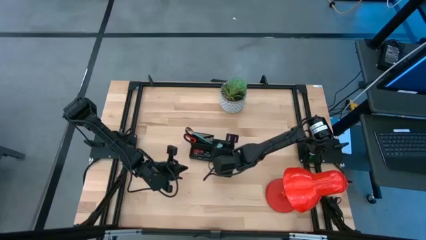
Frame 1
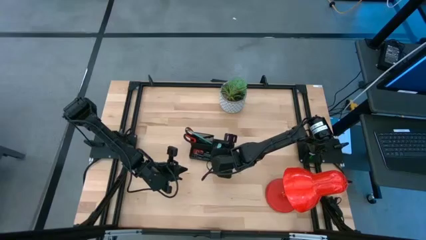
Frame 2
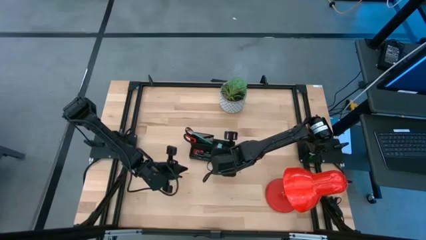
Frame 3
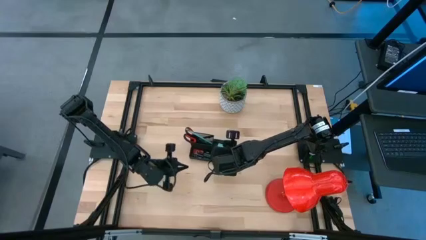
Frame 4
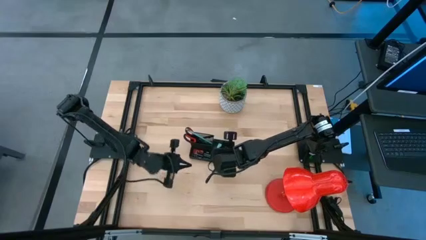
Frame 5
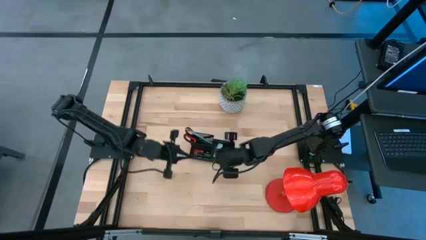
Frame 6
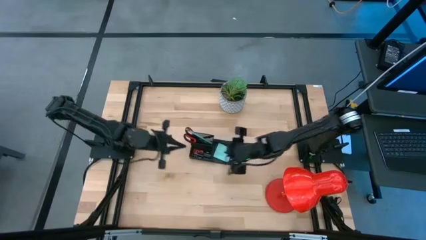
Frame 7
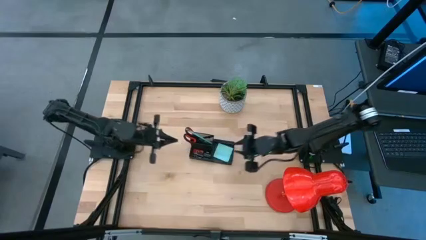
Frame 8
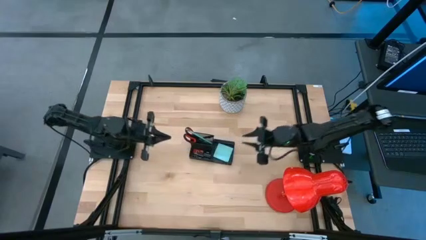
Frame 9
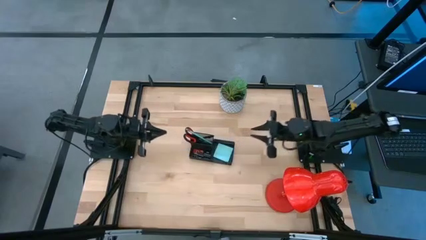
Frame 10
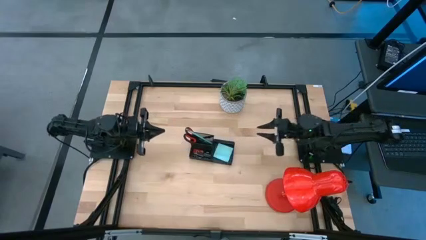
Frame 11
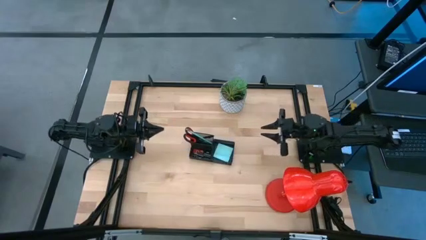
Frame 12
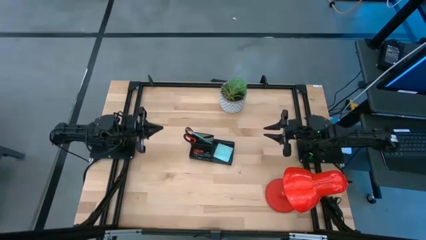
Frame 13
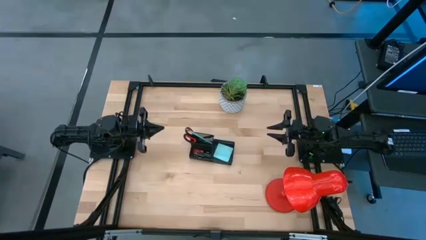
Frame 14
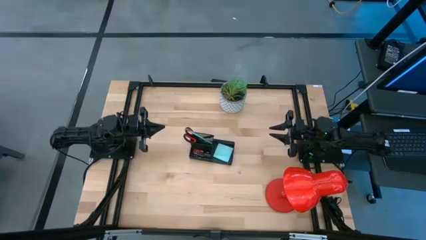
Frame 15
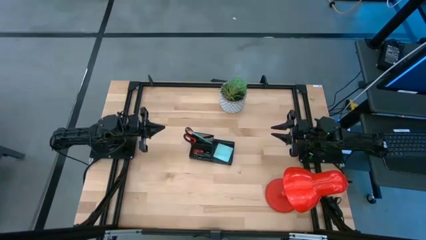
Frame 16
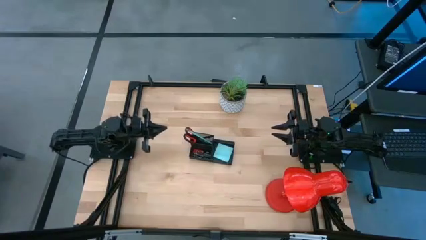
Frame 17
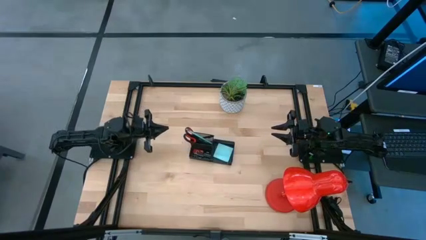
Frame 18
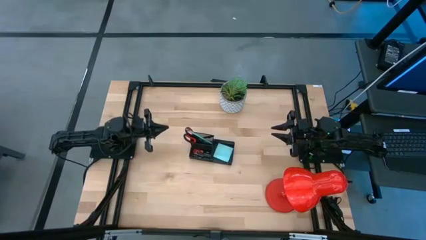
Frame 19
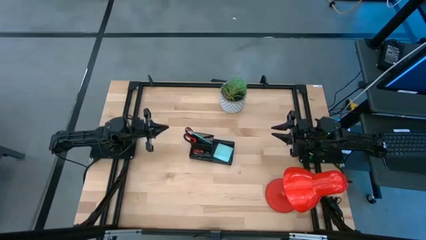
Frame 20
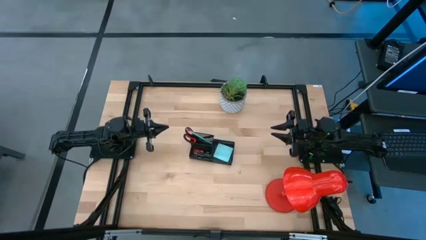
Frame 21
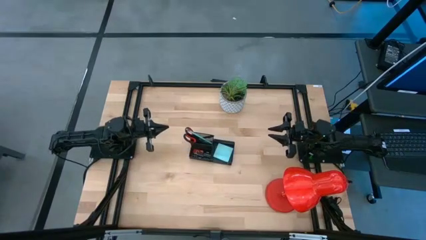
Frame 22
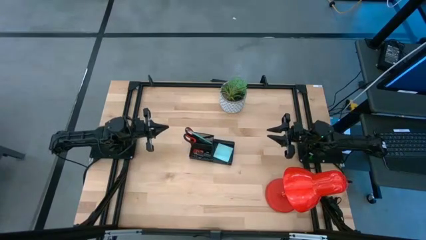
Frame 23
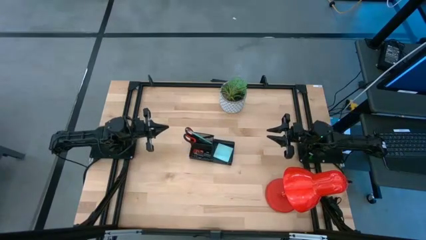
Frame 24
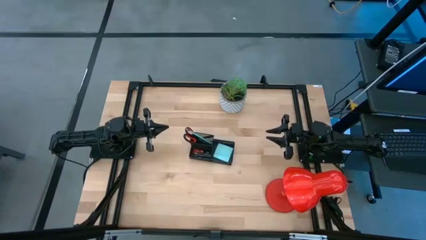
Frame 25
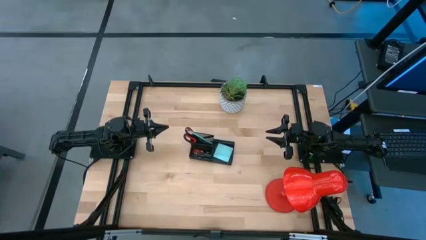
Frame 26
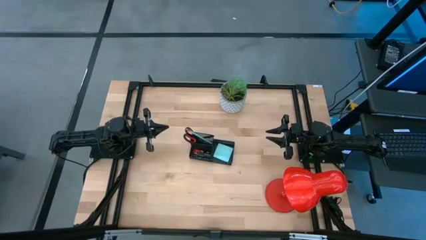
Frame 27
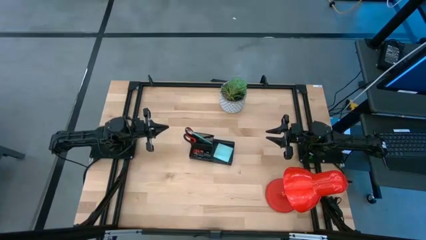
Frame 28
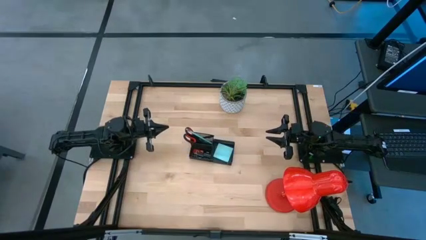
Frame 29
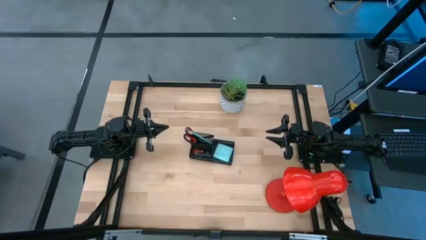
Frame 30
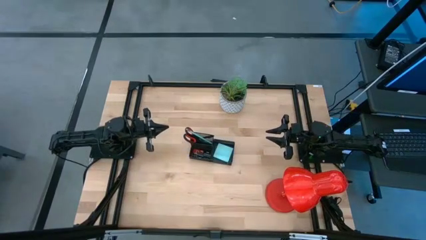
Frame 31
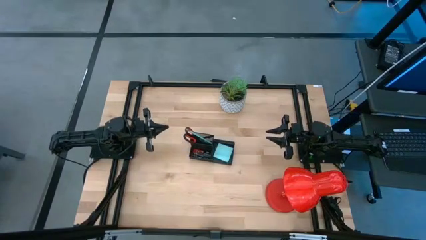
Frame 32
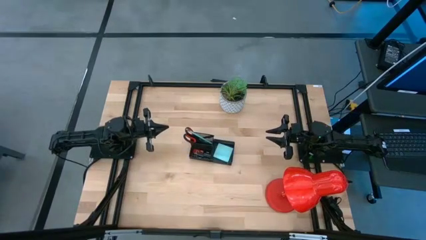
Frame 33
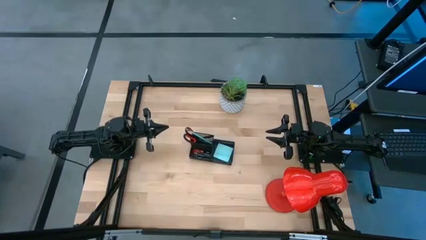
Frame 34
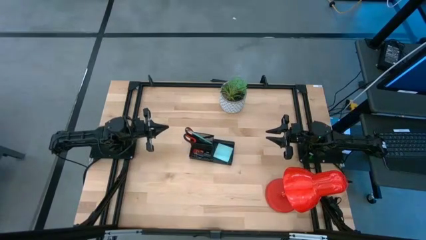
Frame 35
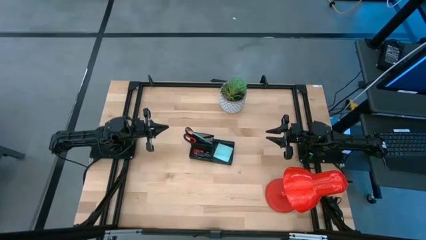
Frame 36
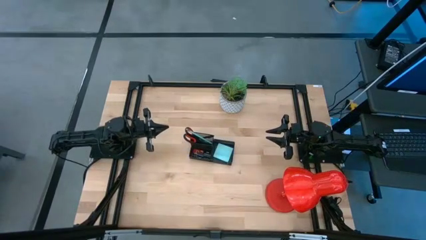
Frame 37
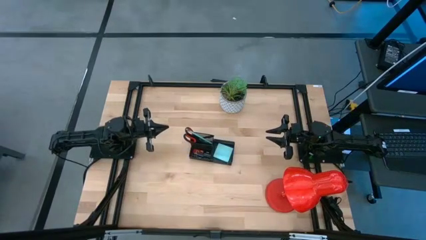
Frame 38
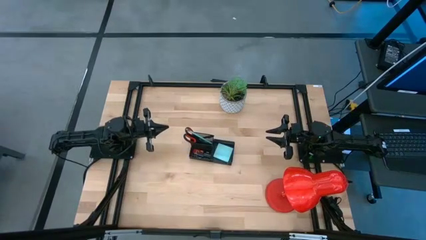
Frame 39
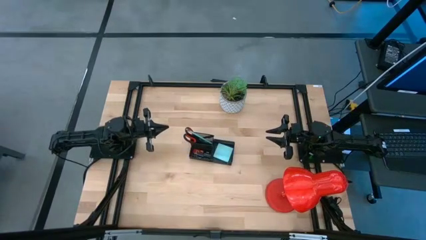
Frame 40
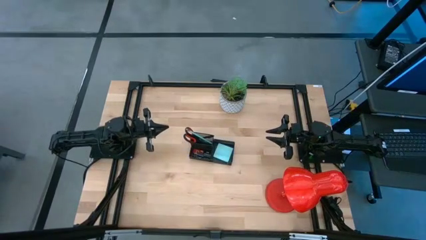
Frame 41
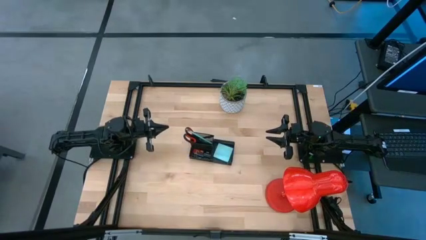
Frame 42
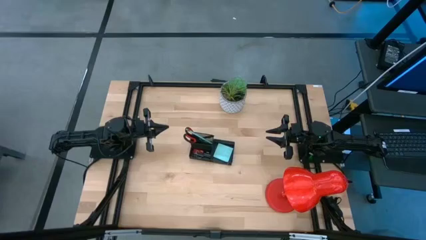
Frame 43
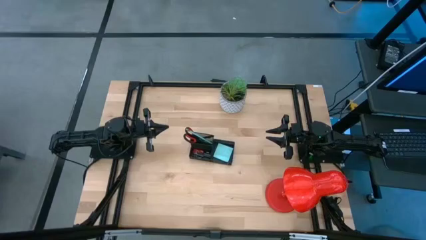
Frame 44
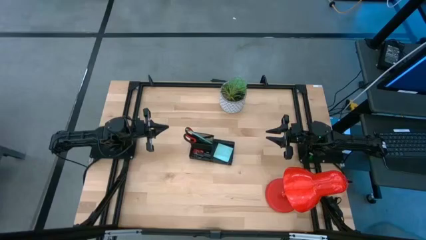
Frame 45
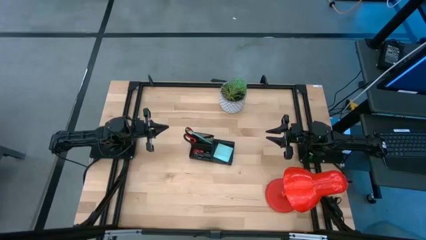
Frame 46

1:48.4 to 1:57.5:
Task: Pick and place office supplies into organizer
Return to Home Position

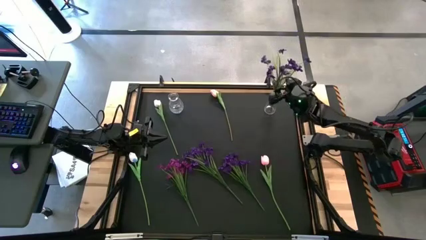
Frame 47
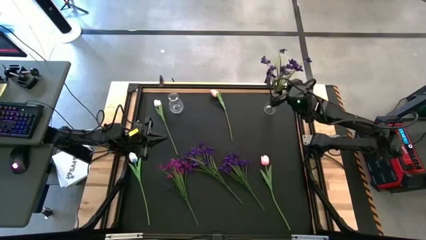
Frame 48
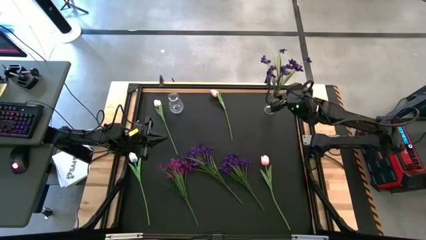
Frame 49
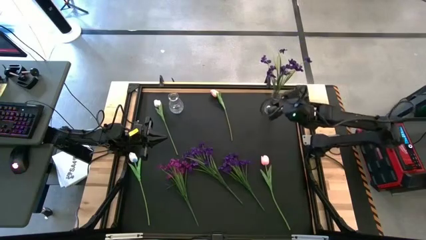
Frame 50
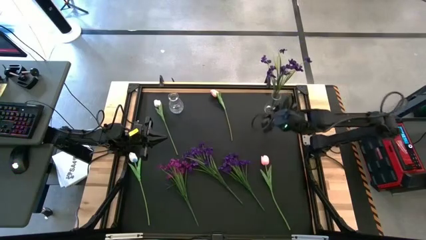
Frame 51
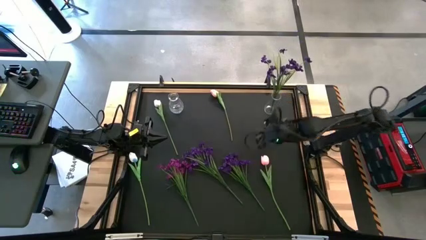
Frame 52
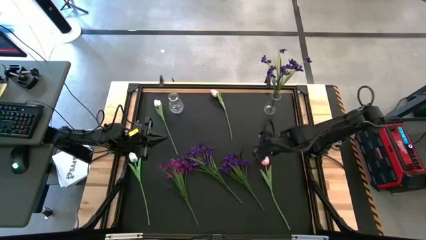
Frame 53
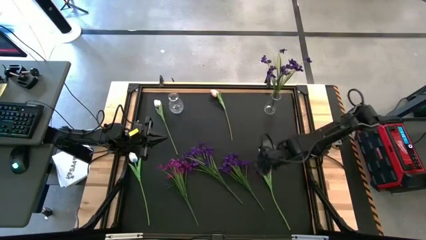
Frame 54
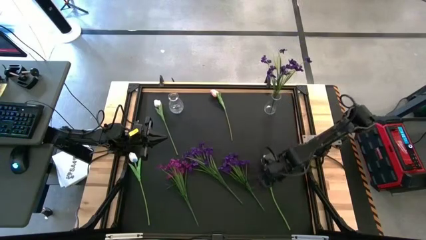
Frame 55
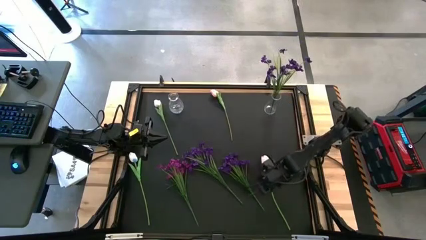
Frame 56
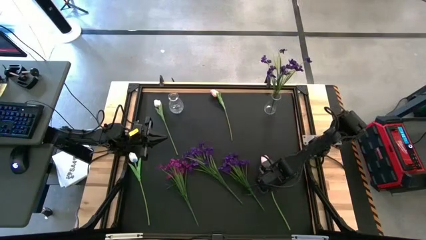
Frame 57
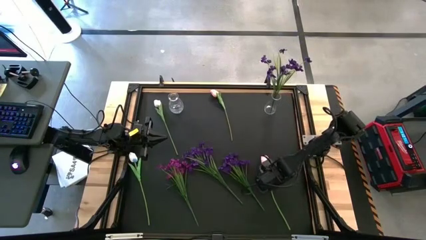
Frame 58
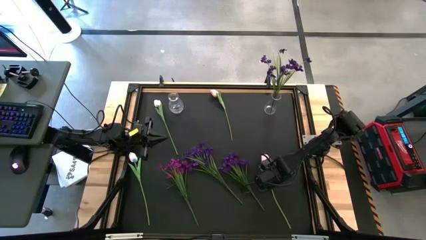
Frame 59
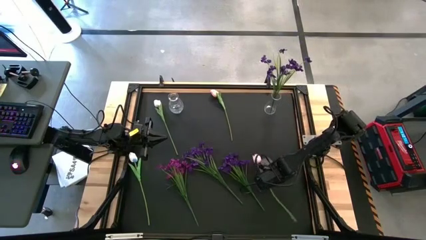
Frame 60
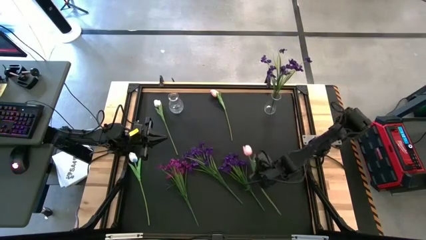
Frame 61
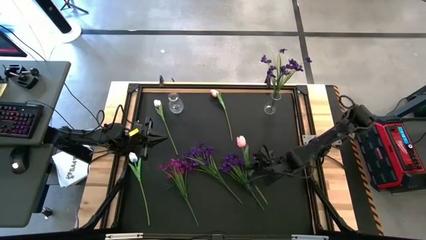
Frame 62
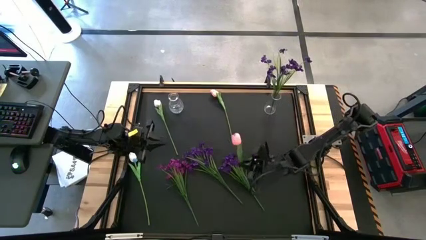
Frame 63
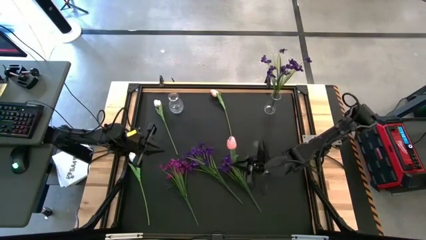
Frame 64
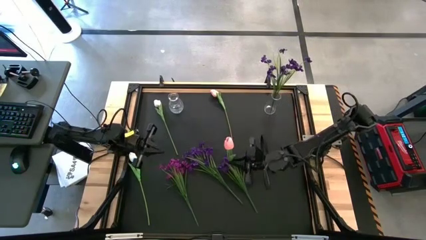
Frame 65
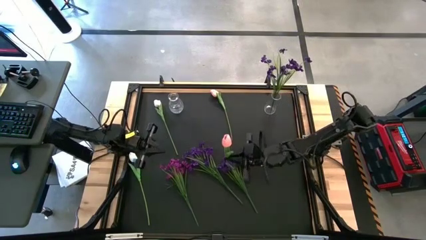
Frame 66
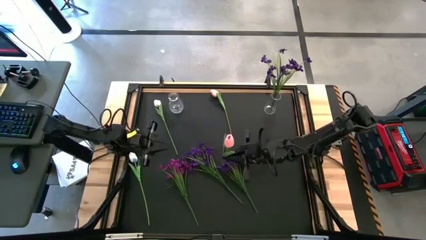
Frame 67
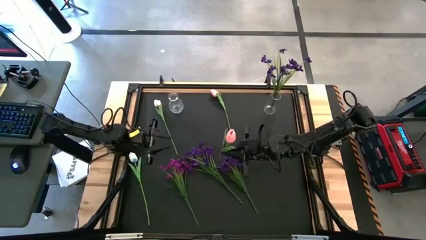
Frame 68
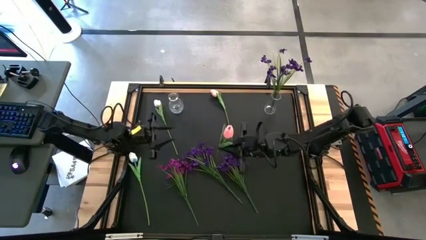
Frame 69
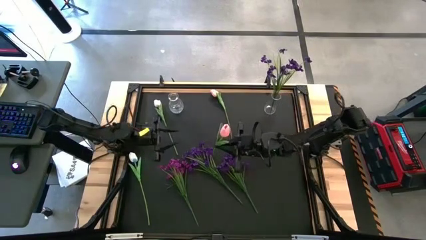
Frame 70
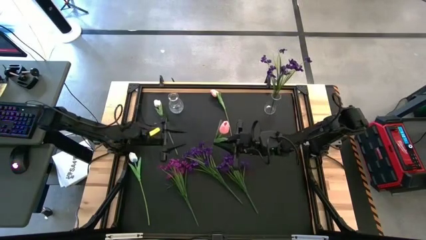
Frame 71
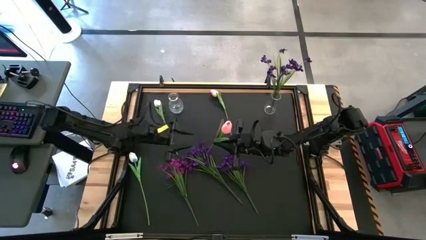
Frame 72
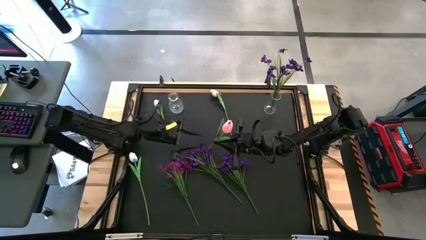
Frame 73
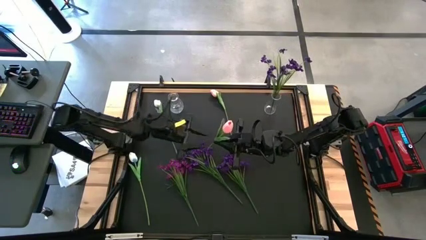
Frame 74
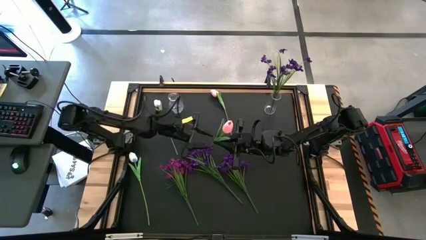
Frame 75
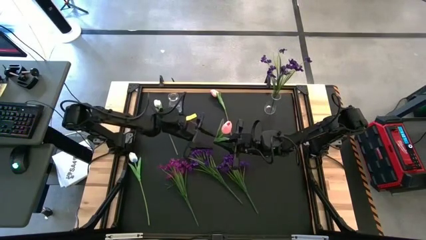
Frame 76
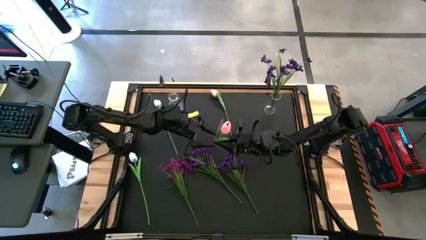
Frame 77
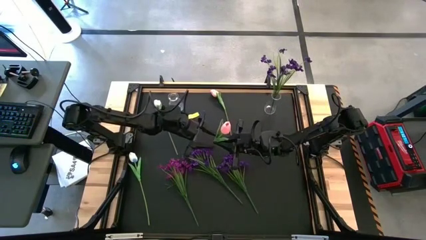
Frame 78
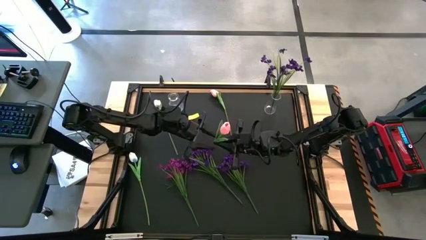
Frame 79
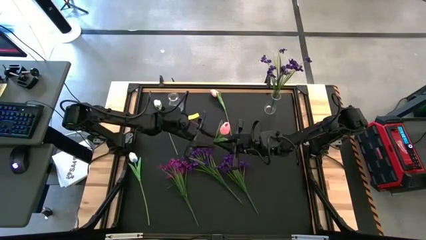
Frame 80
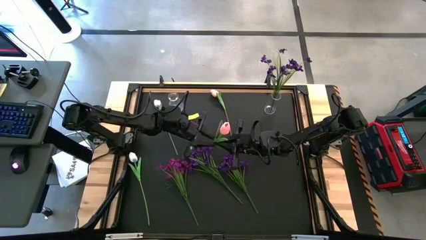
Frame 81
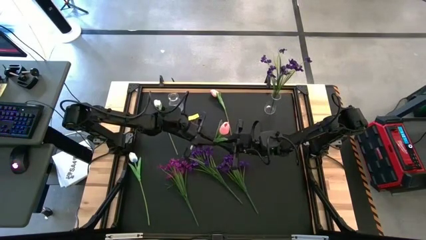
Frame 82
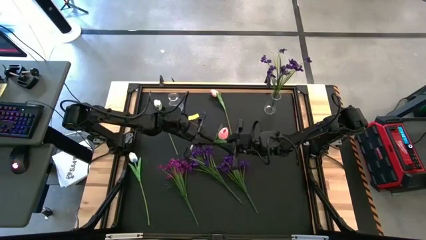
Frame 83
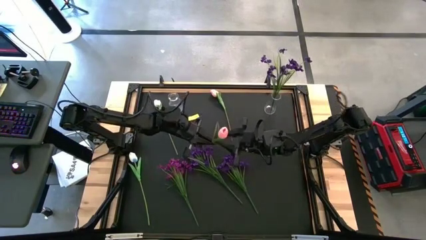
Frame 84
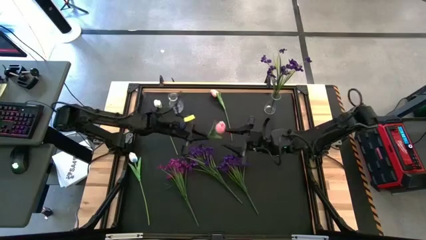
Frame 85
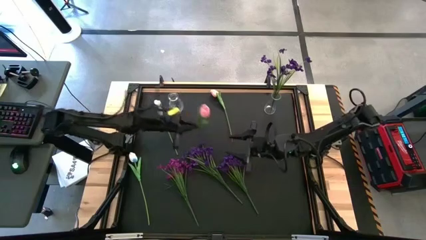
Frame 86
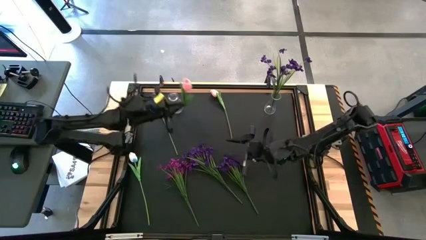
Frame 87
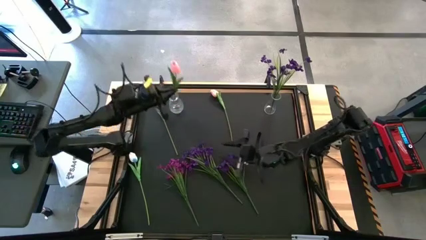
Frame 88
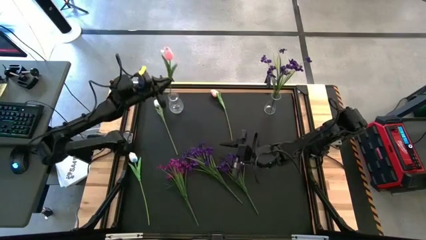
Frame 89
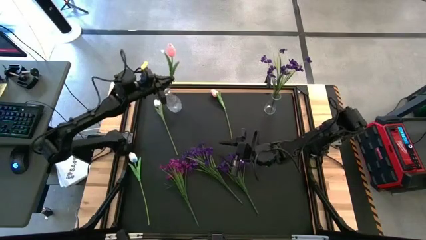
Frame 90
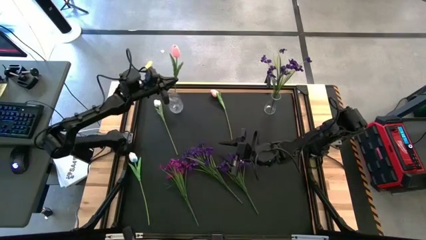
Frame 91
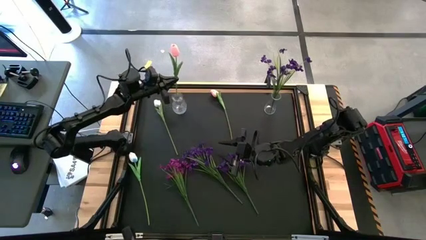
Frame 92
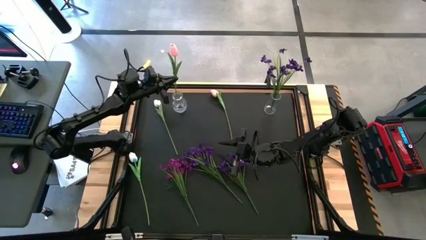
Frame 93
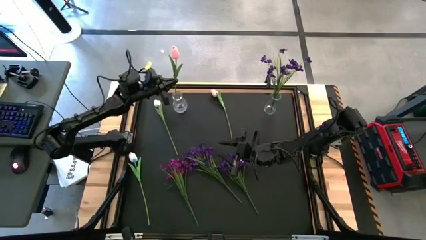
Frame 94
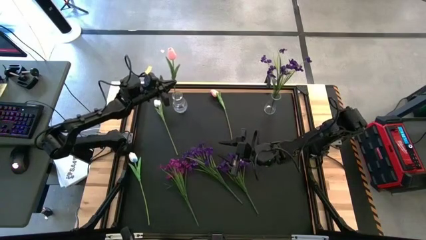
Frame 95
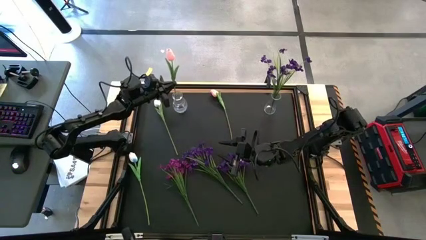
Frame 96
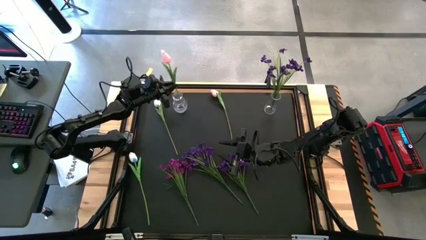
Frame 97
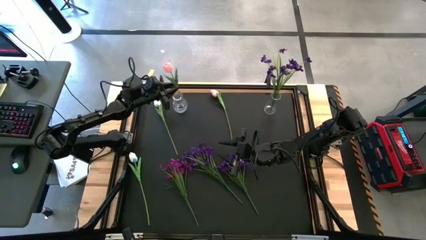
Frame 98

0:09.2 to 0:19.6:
Task: Sort flowers into vase by color
Put the bottom pink tulip into the left transparent vase
